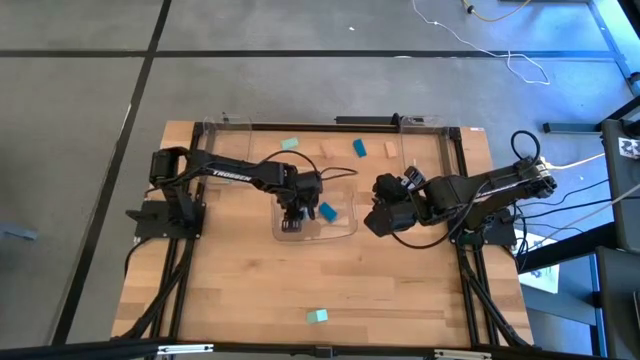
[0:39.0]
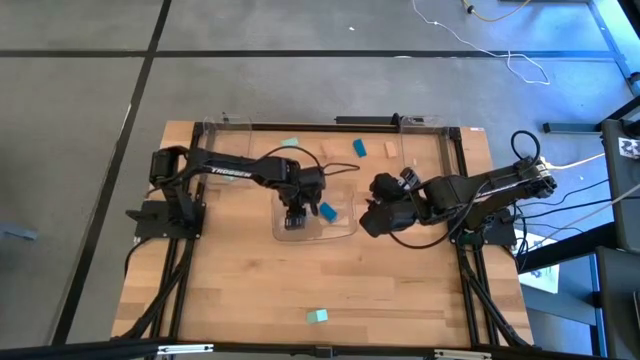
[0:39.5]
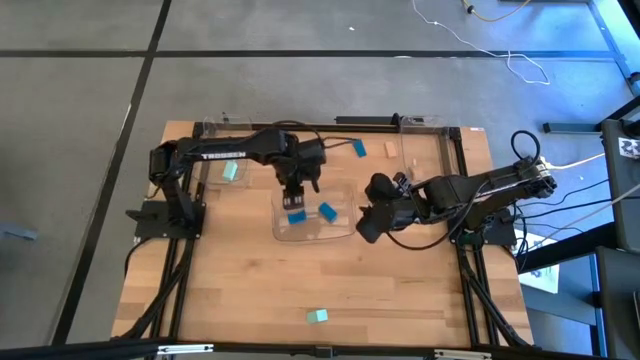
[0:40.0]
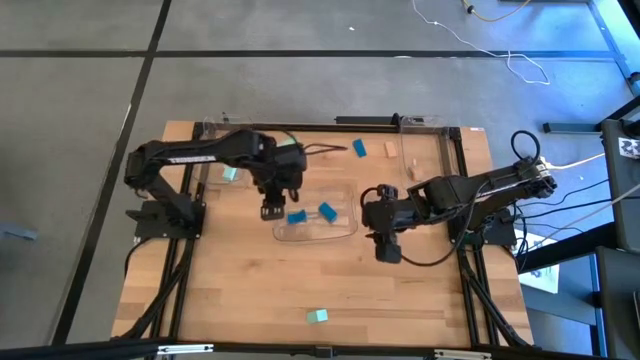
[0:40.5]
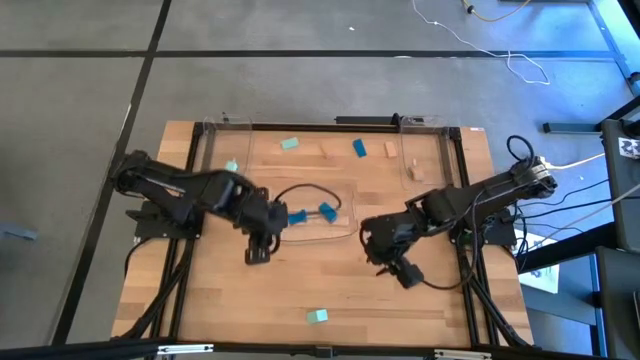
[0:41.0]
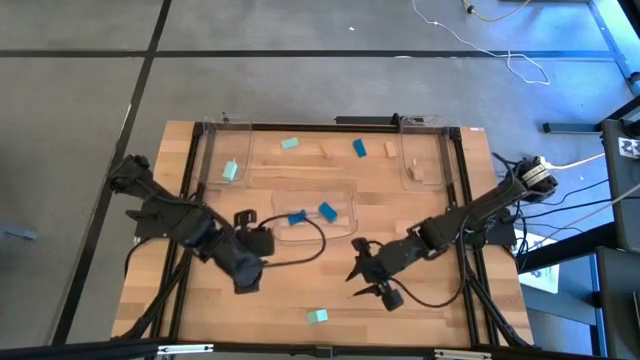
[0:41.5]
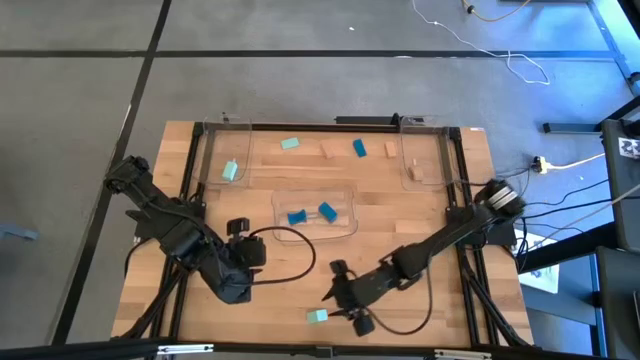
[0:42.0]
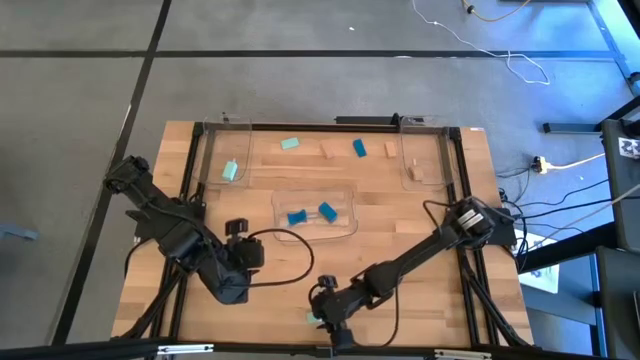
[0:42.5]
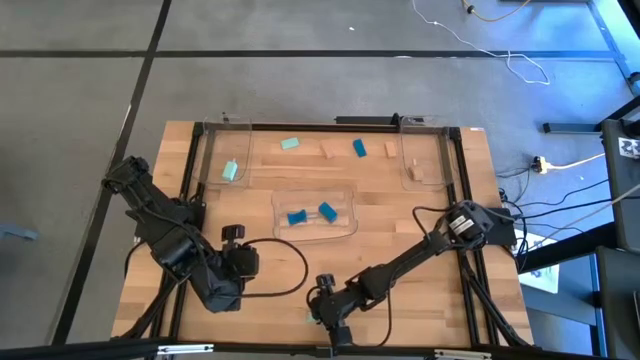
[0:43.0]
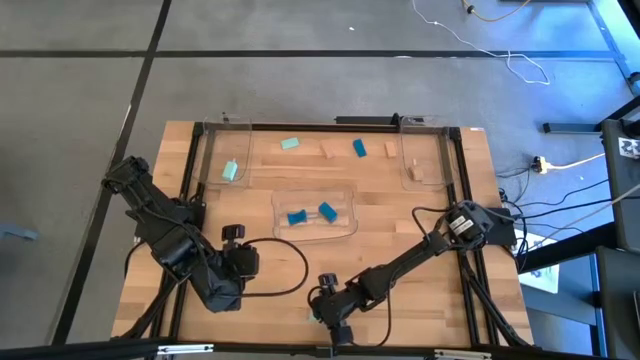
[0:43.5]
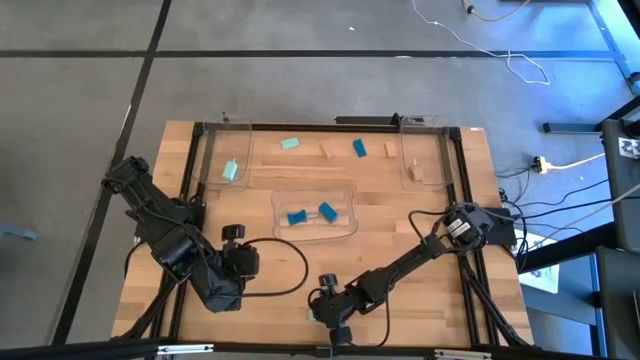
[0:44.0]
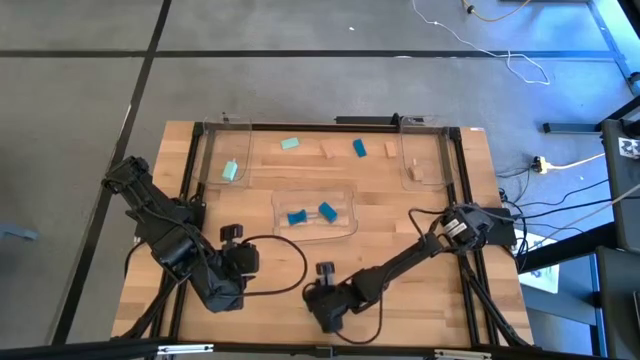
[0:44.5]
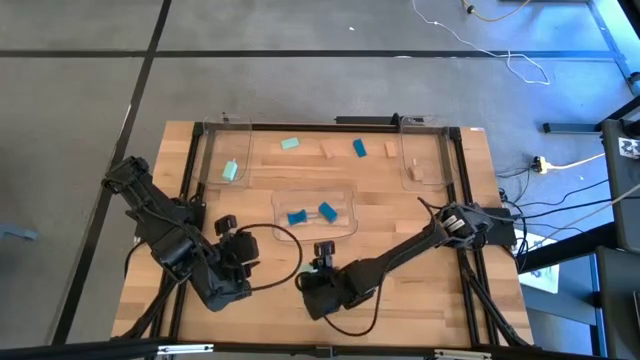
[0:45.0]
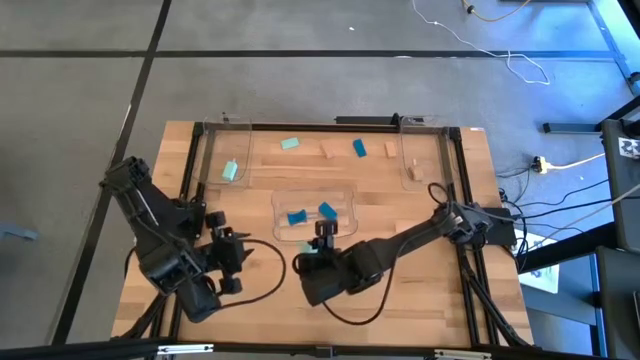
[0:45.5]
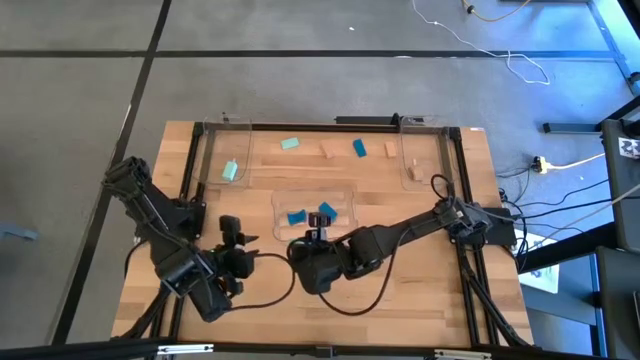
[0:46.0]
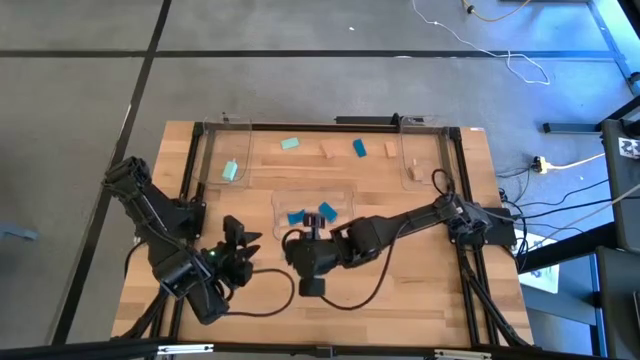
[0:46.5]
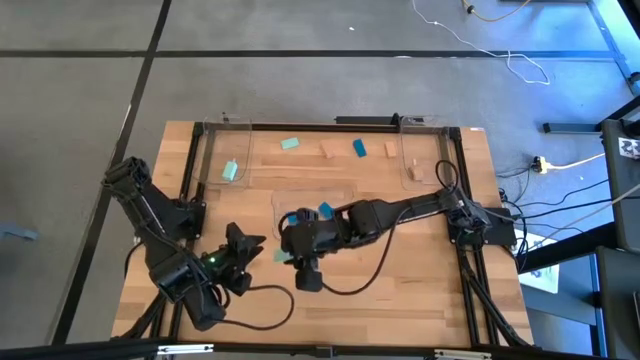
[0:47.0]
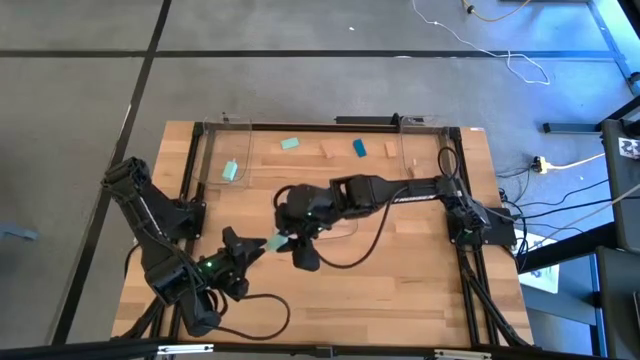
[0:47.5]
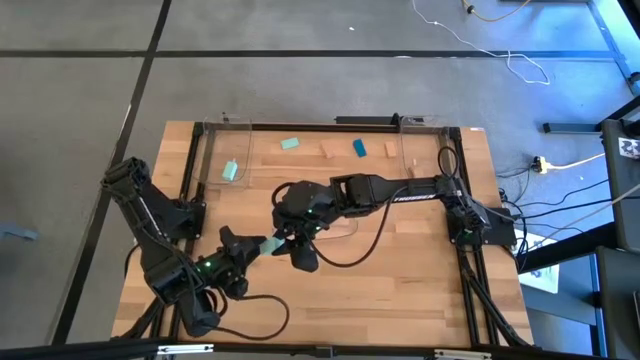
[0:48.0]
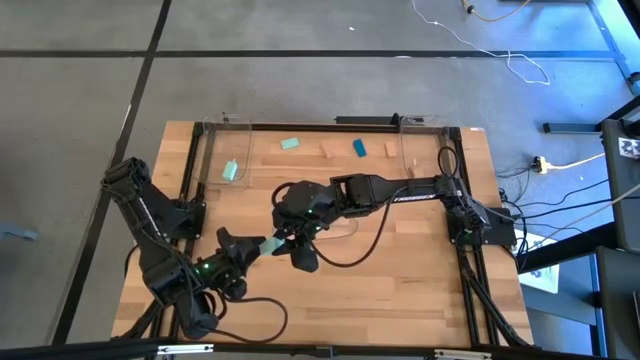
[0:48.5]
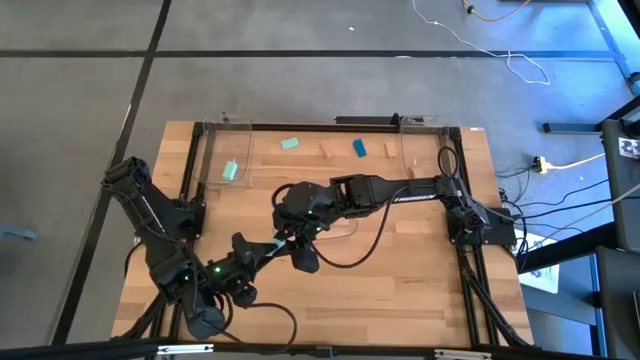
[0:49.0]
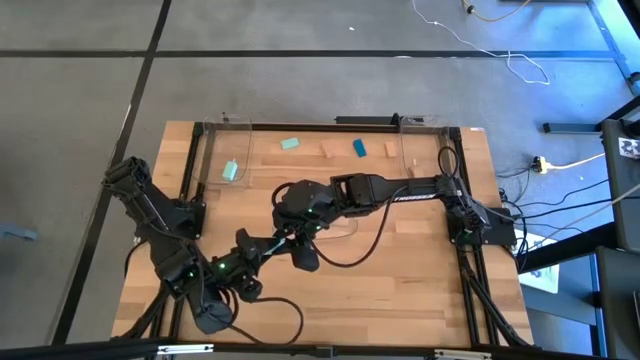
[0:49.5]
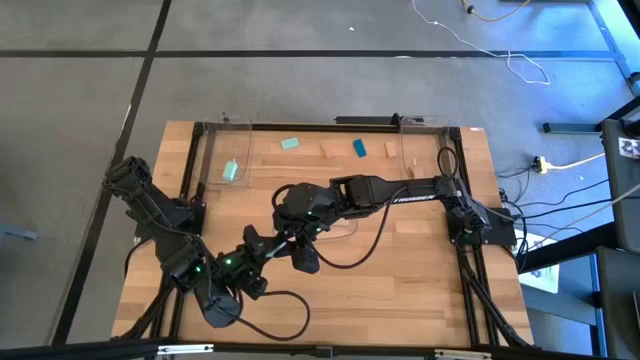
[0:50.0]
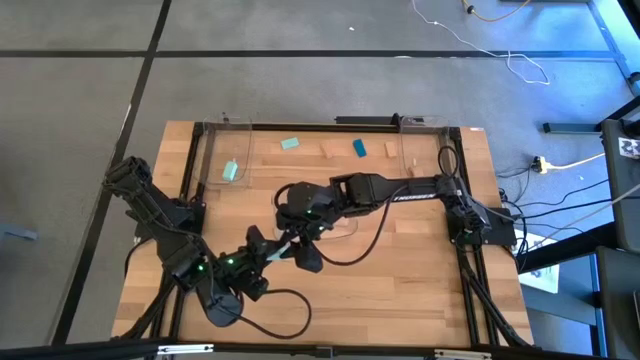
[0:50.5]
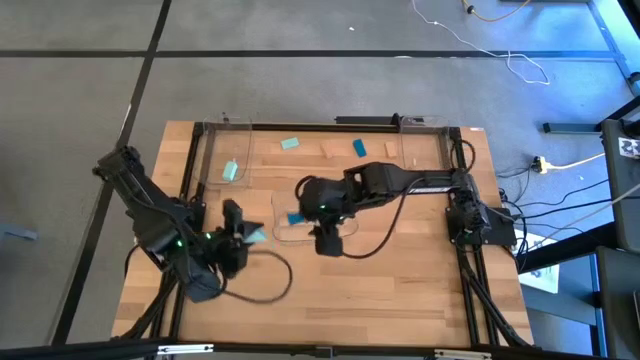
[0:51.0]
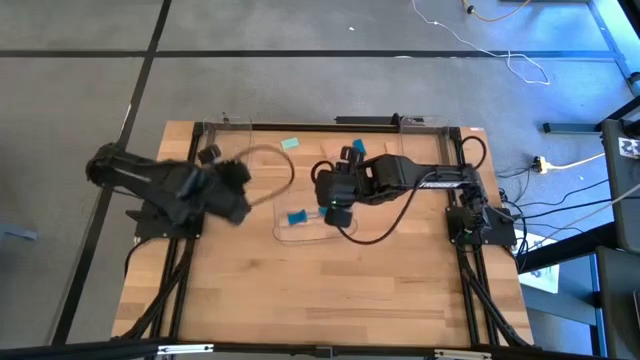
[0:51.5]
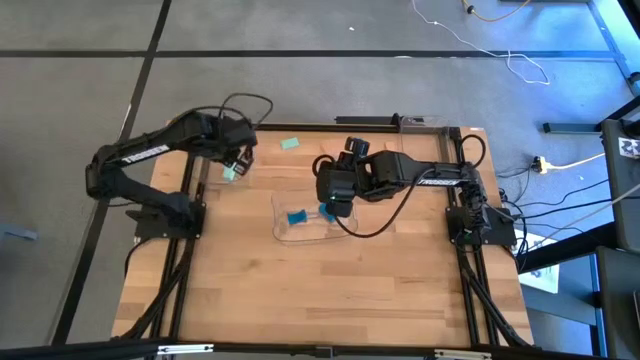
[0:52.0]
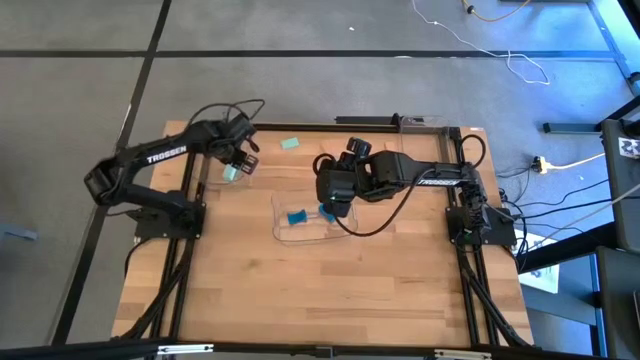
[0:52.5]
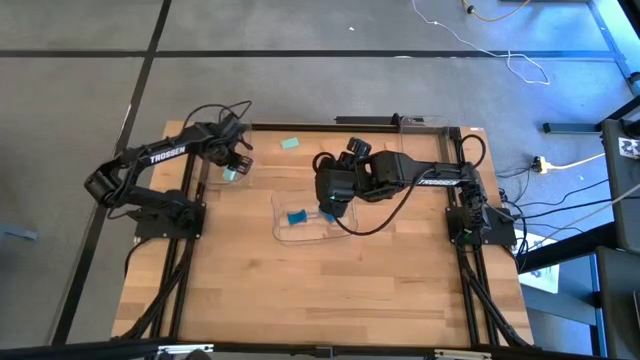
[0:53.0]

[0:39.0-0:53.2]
Task: Sort & place blocks by color
Put the bottom light blue block into the top left transparent bin

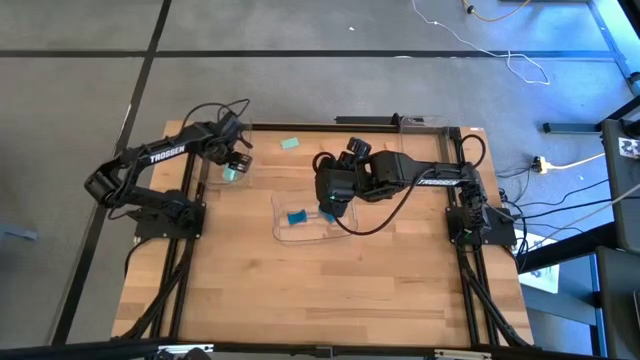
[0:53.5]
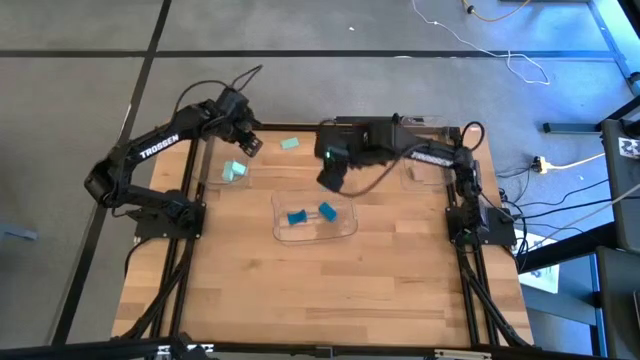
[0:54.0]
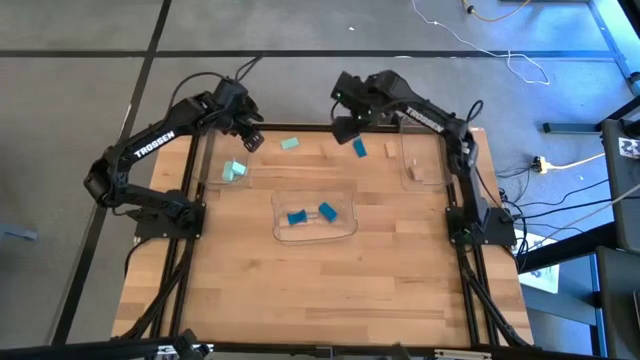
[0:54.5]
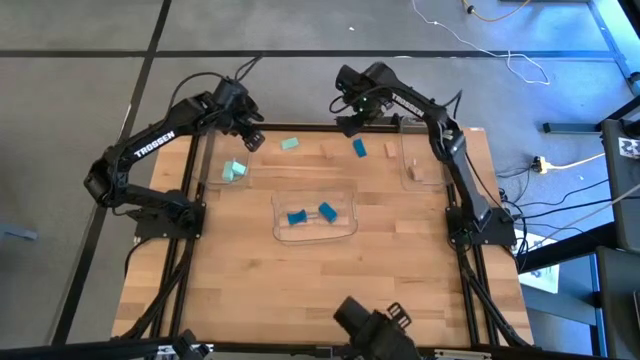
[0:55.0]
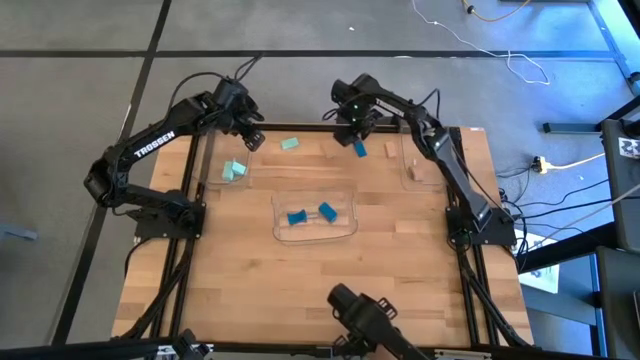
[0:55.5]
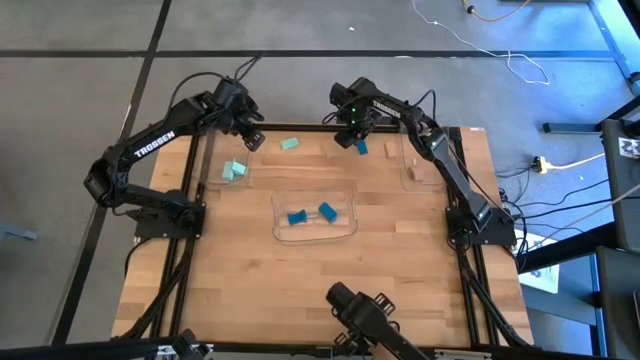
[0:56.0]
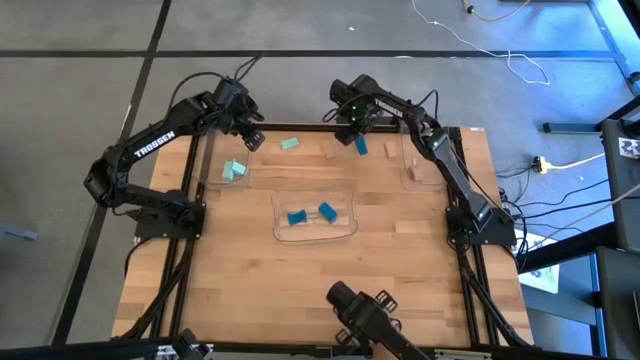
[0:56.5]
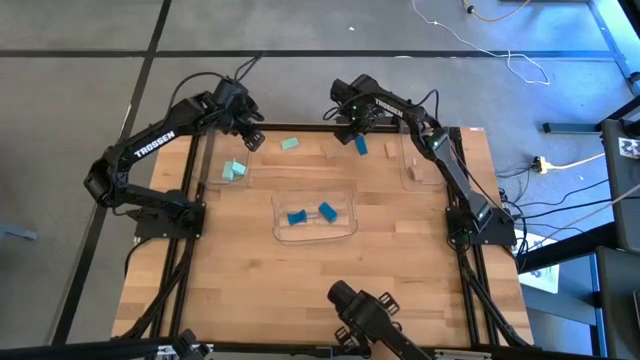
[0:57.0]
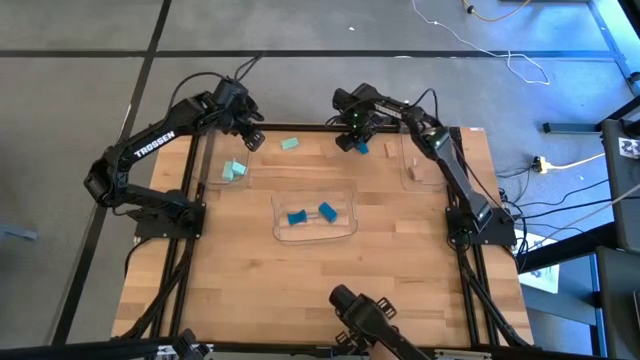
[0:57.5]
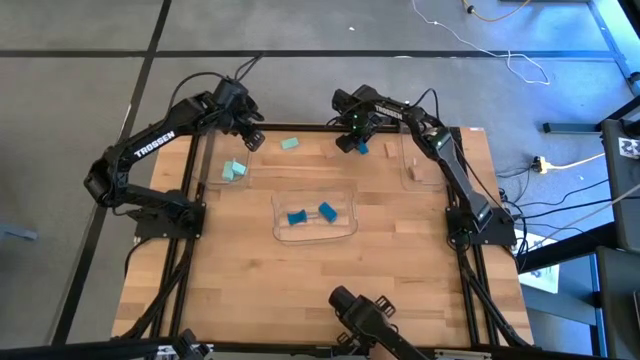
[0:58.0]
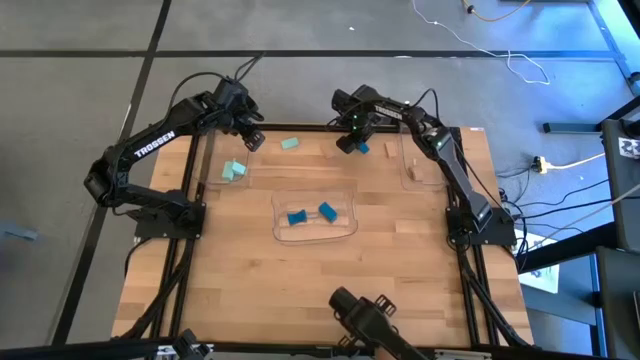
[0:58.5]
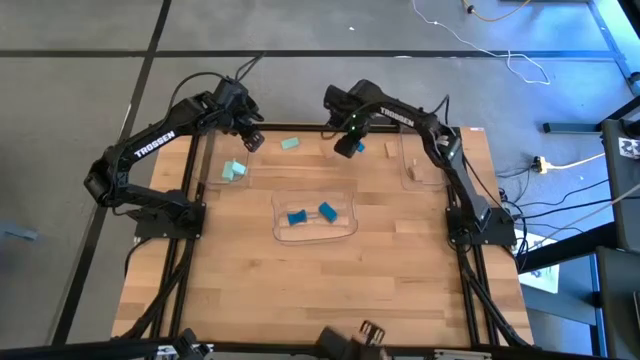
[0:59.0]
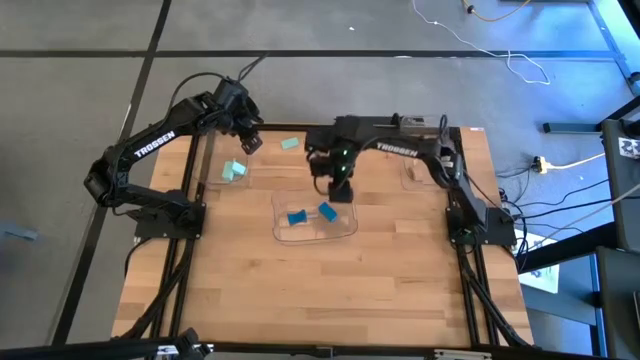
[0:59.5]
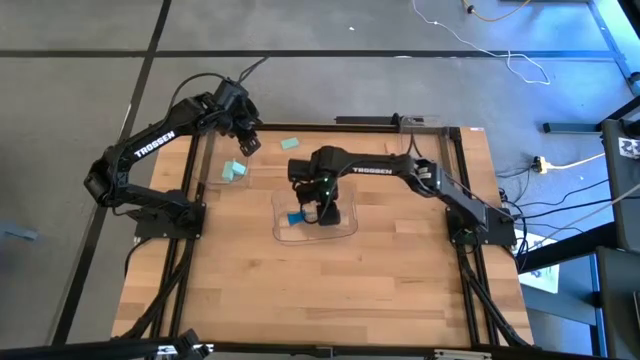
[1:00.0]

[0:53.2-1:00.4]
Put the blue block into the middle transparent bin
